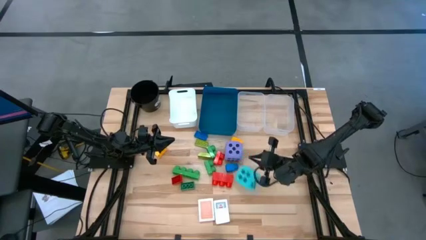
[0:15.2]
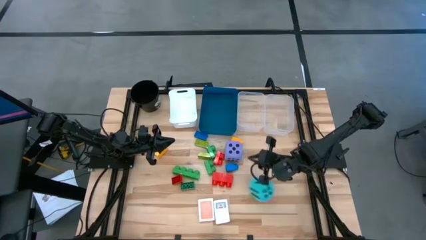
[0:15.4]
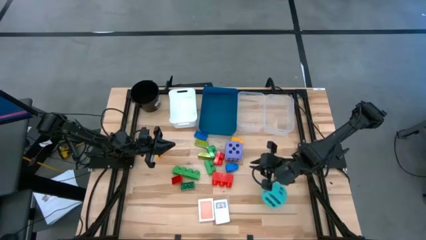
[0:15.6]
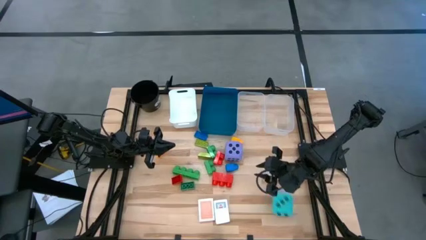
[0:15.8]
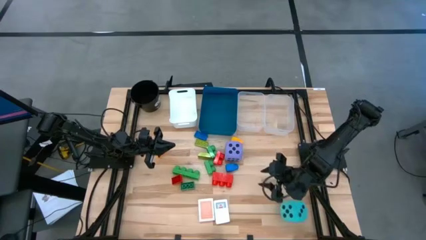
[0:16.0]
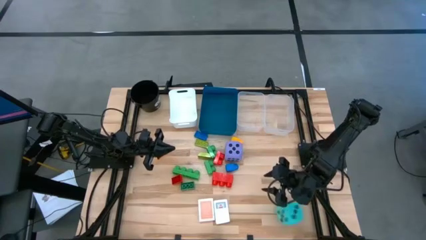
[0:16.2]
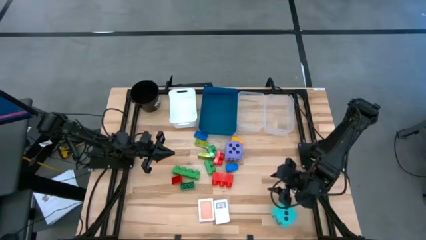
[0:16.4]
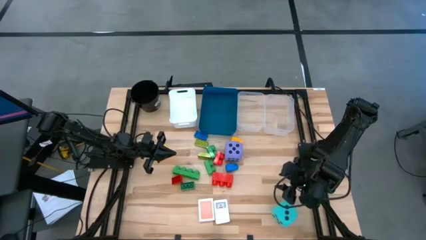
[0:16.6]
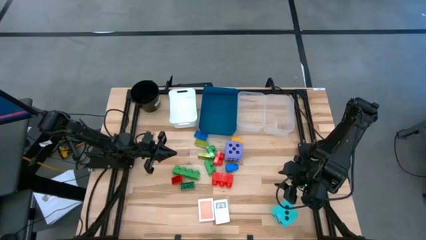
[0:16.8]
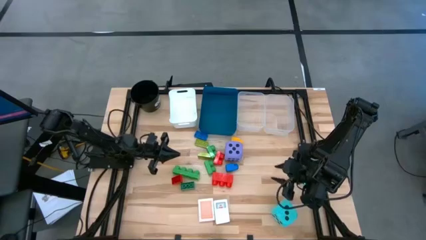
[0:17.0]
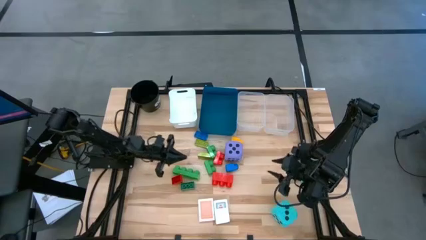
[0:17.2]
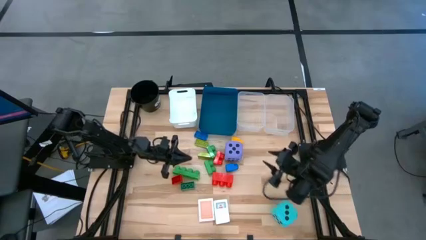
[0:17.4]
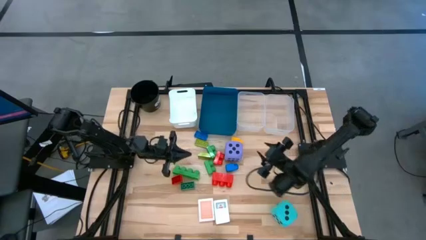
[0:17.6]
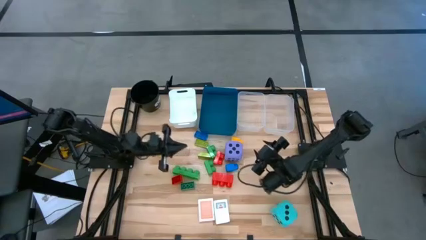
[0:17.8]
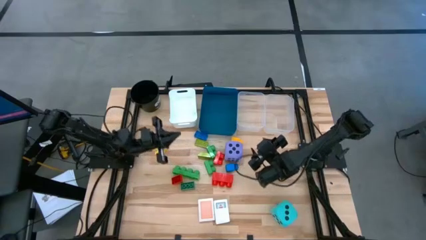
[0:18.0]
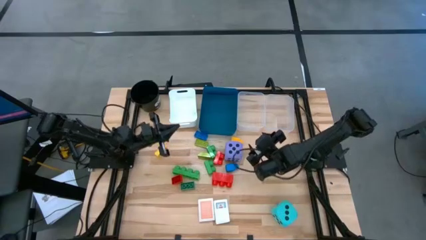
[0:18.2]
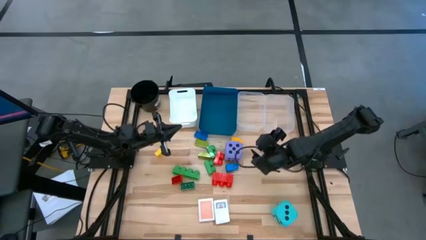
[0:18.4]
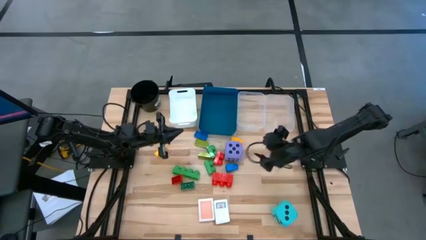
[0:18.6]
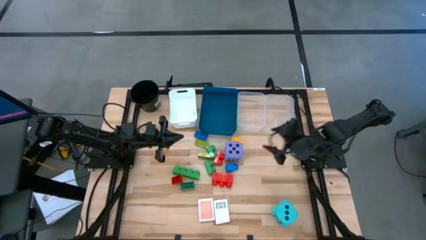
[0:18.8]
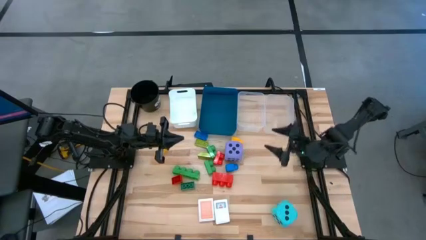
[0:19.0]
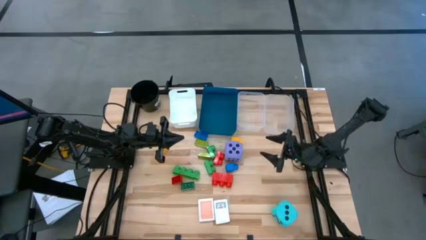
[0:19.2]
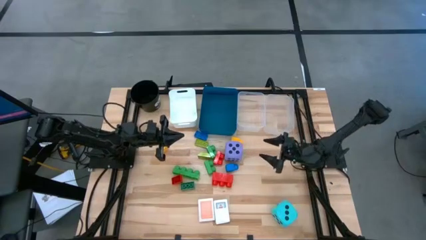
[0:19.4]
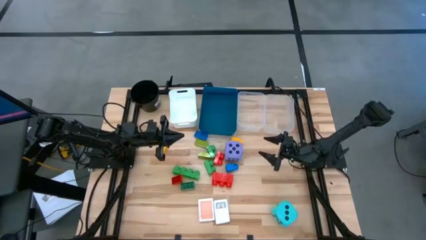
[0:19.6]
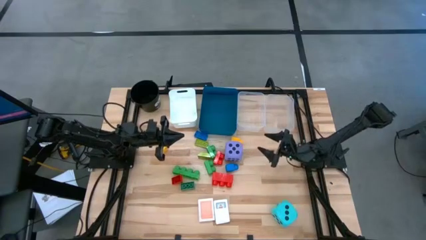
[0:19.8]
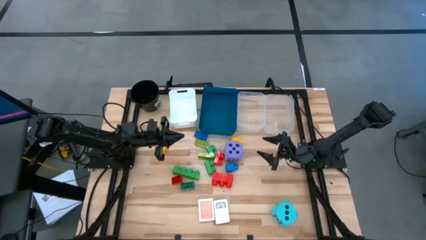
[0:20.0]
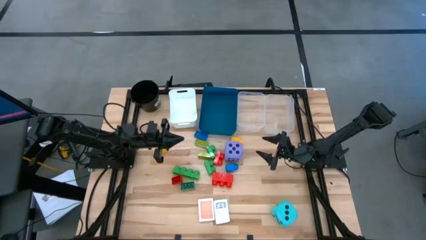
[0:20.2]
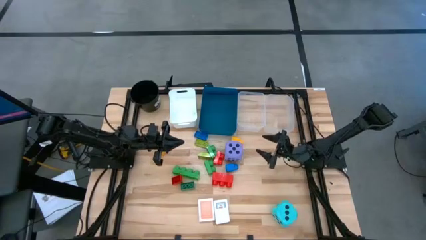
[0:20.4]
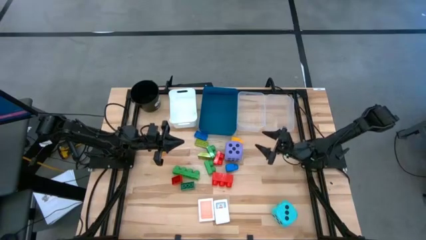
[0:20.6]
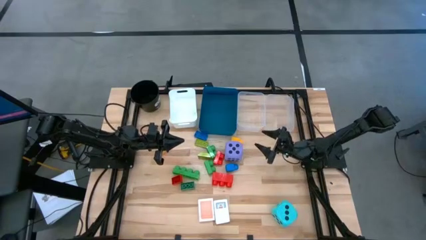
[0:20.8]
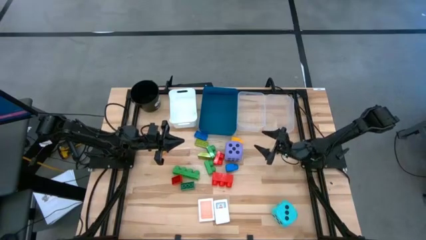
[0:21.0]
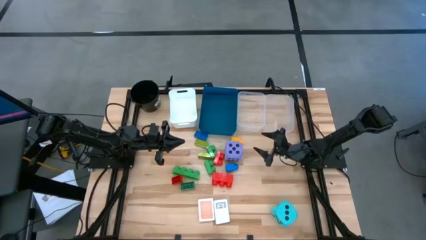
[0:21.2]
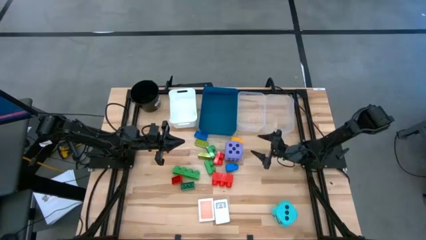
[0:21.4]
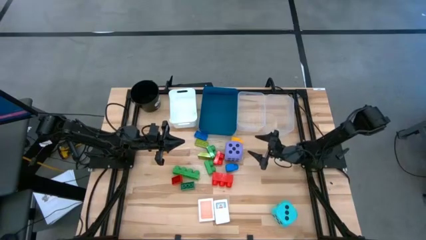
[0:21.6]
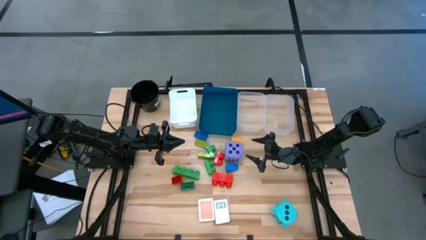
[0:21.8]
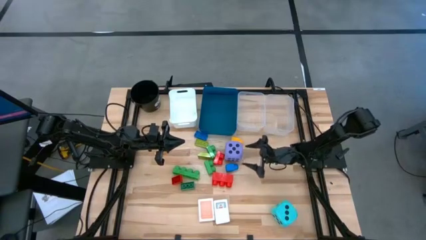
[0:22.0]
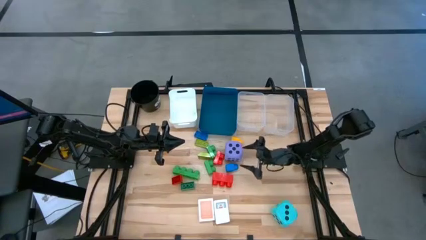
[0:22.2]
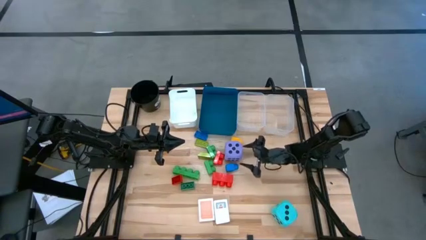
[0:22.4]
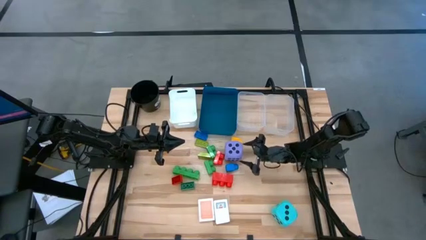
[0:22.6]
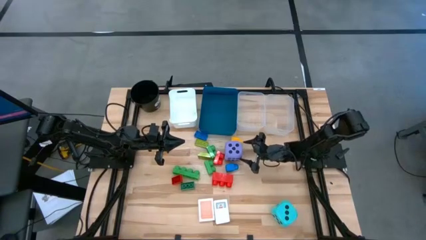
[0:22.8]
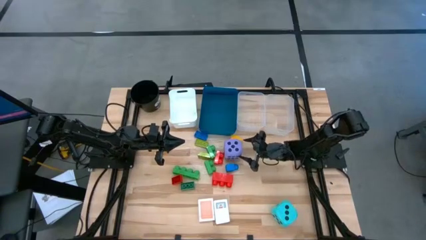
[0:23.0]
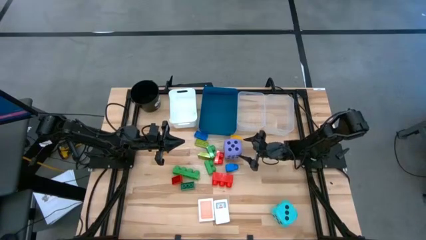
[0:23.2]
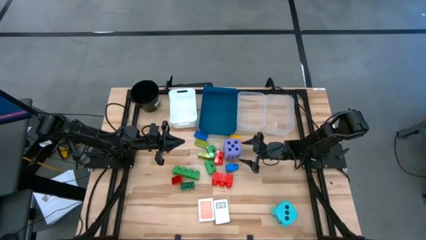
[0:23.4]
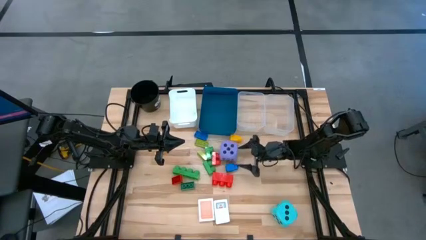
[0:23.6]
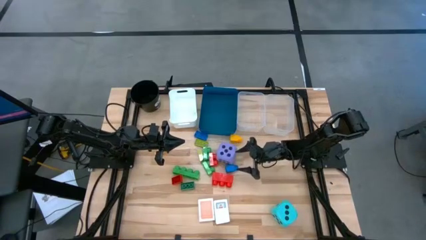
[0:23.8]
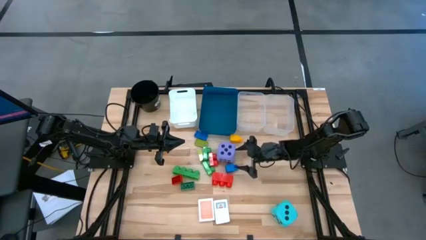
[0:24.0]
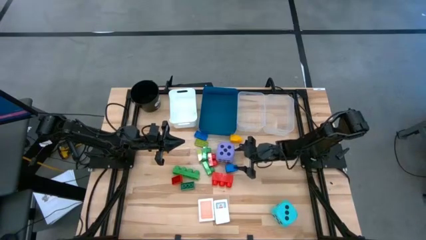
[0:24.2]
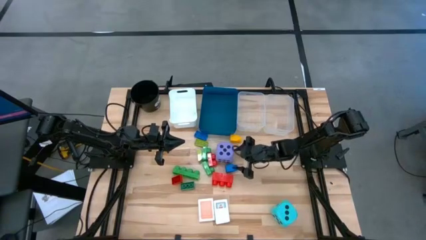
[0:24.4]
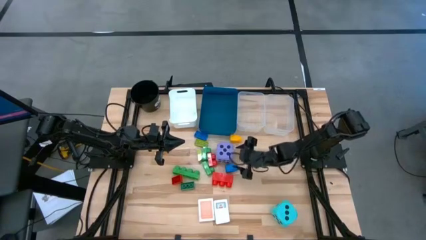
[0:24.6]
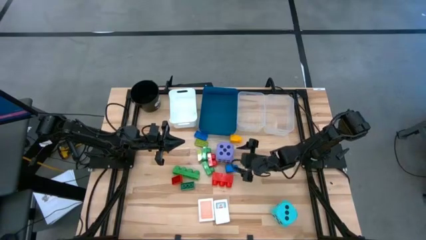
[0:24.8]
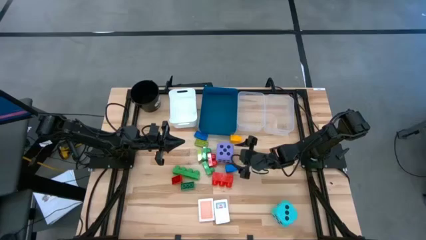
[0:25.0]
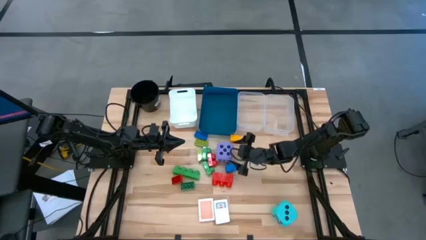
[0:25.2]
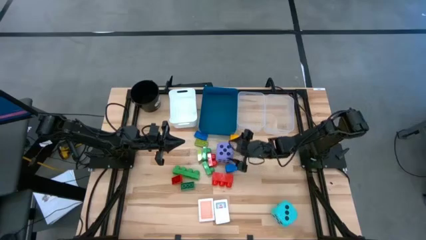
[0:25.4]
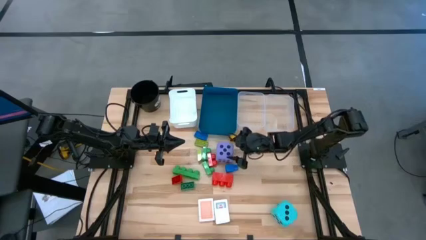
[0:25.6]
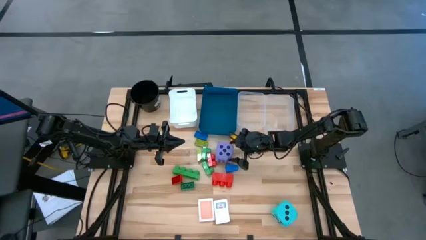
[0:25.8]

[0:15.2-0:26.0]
Task: Pick & Place Toys
Put the violet dice into the blue bin

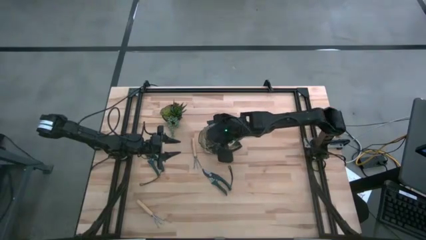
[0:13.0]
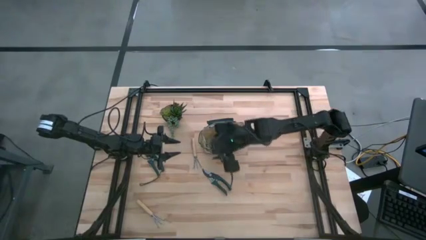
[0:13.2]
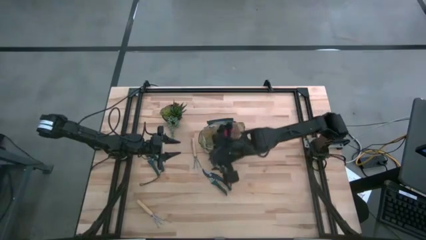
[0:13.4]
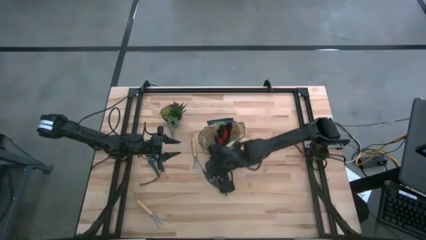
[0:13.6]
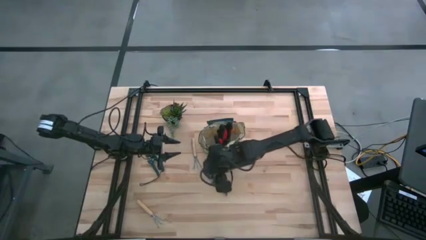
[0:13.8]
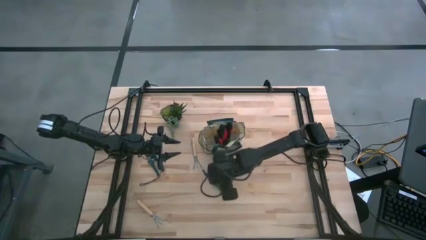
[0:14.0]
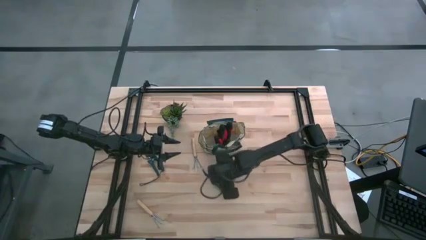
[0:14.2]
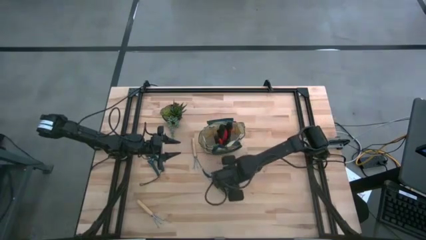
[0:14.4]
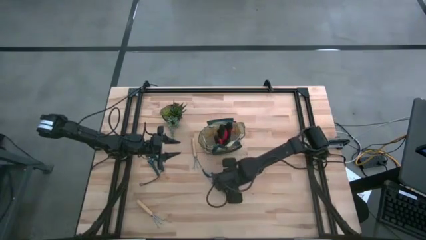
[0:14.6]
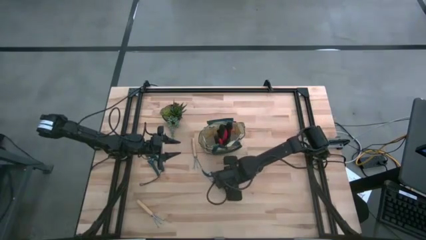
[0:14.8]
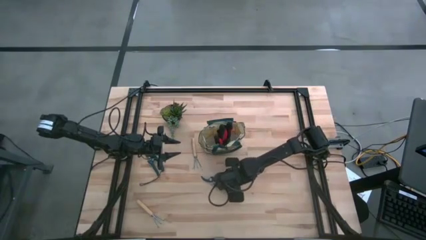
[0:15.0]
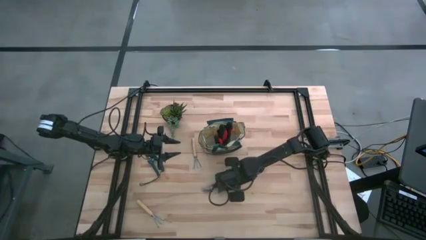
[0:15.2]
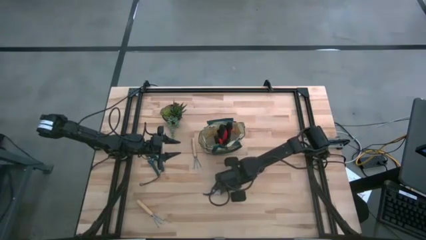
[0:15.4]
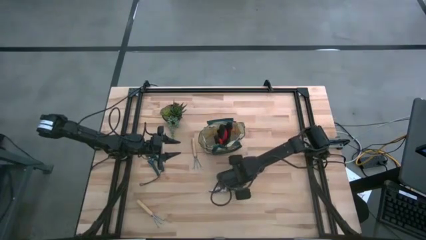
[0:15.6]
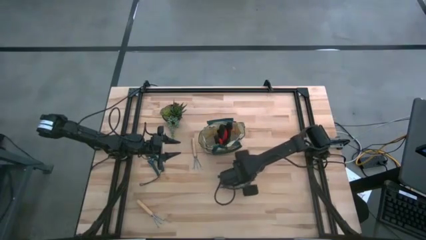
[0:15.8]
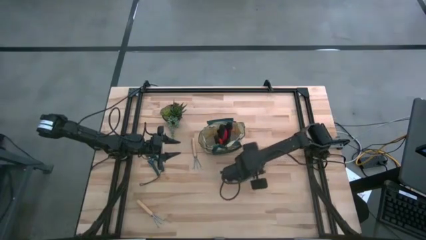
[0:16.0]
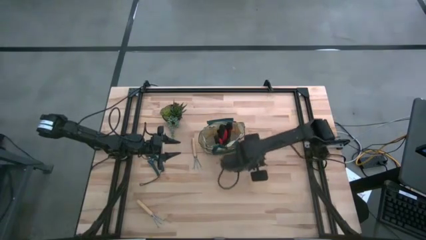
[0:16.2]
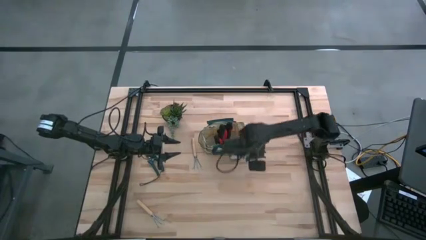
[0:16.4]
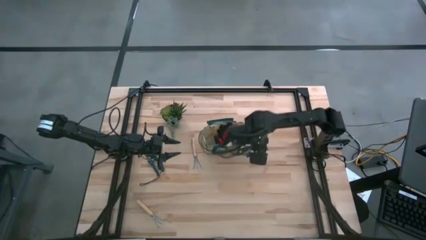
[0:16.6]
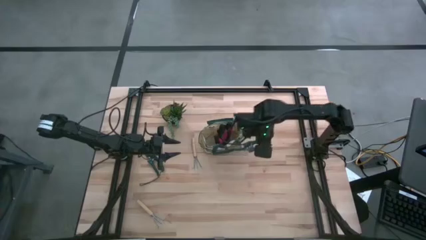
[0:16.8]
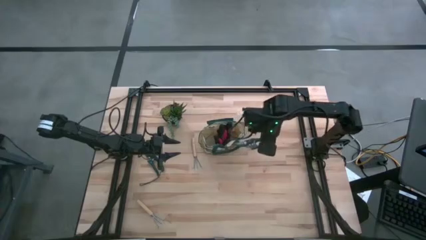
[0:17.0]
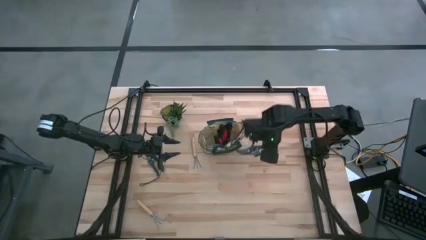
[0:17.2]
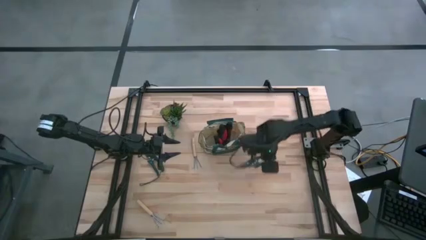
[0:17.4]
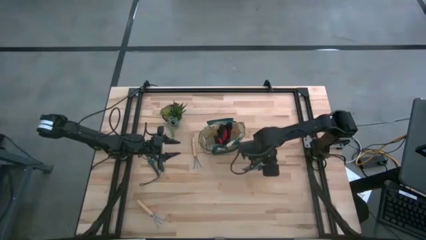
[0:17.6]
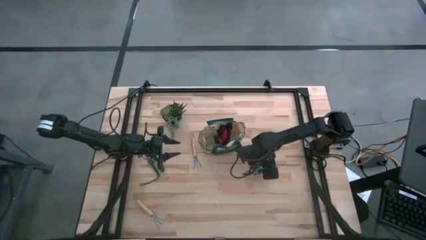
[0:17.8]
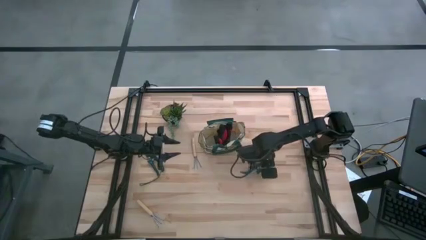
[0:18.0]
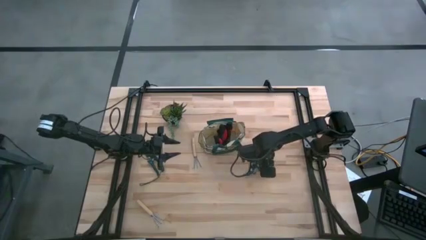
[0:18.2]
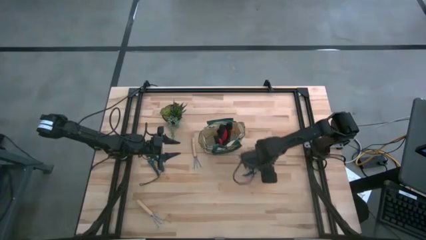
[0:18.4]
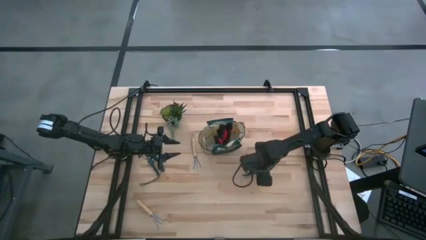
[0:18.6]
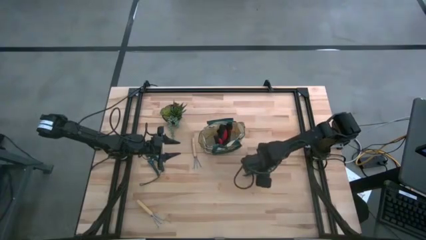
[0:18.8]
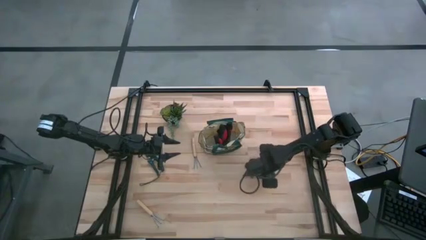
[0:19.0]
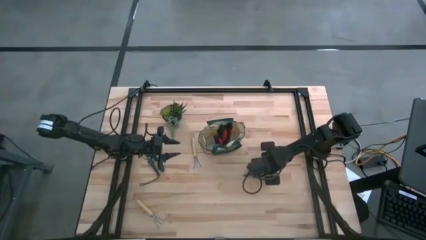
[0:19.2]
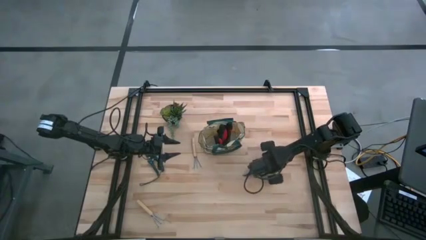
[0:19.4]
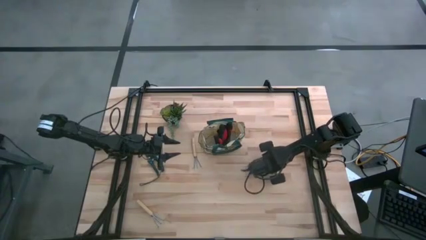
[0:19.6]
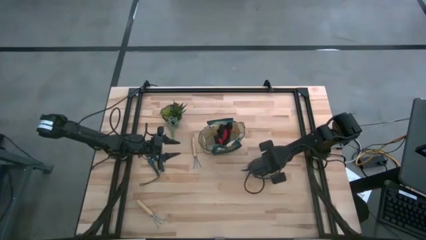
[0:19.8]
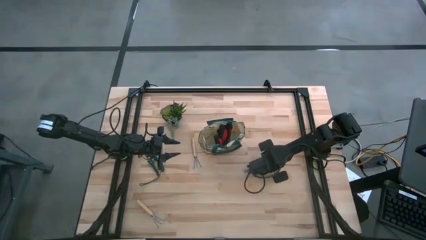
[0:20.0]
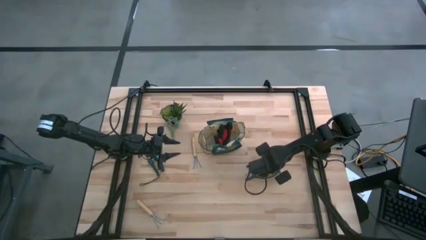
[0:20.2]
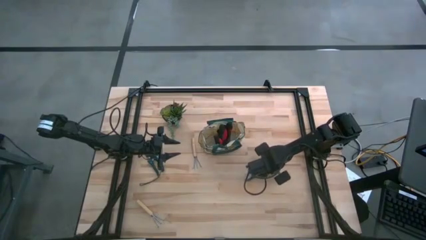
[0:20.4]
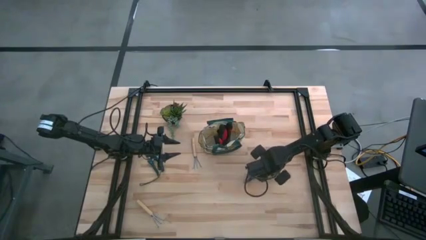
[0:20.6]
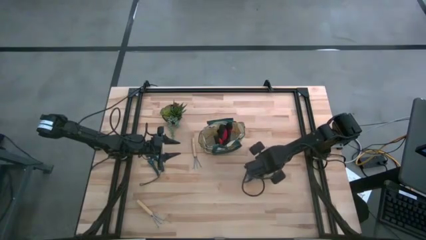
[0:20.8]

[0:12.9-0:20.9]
Task: Pick & Place Garden tools in Gardening bag
Put the green shear scissors into the white gardening bag
